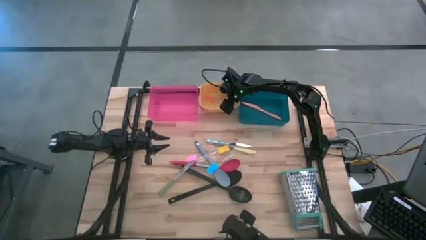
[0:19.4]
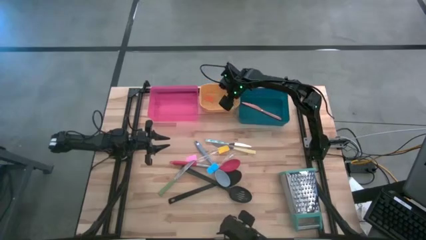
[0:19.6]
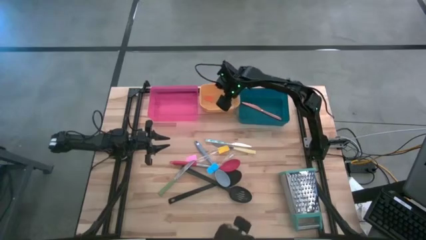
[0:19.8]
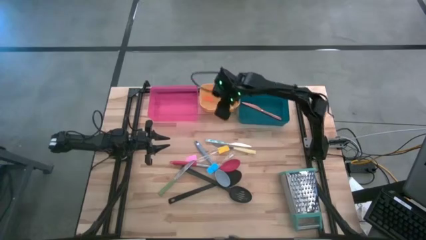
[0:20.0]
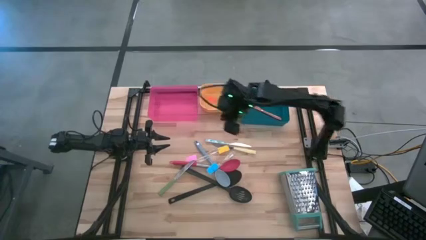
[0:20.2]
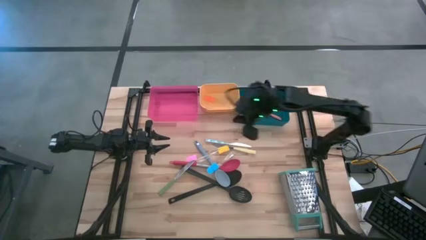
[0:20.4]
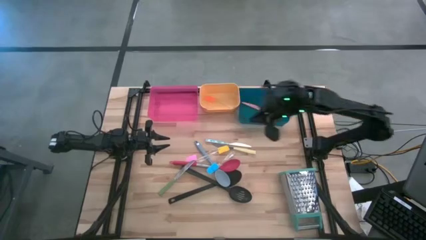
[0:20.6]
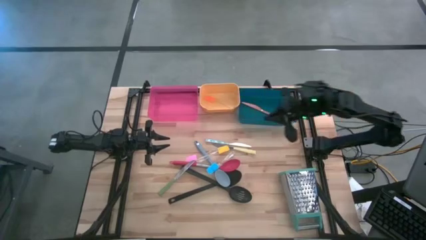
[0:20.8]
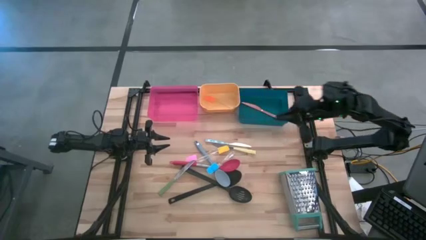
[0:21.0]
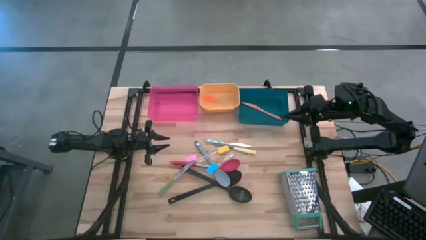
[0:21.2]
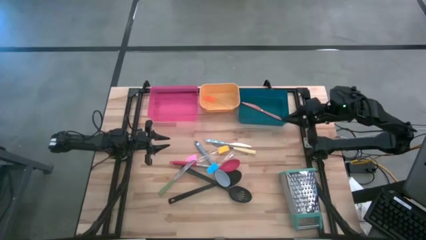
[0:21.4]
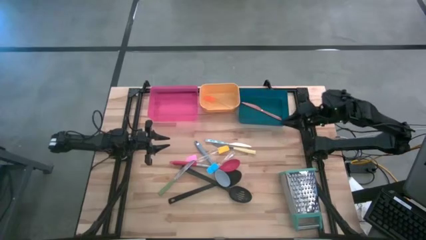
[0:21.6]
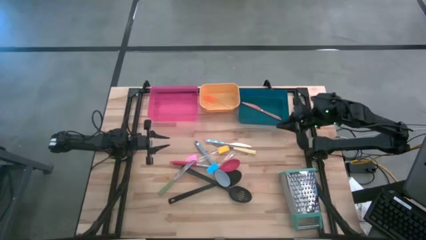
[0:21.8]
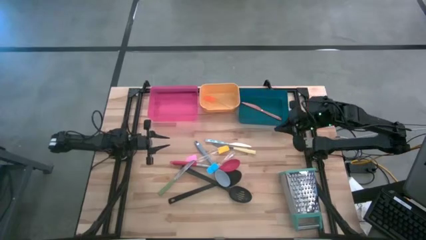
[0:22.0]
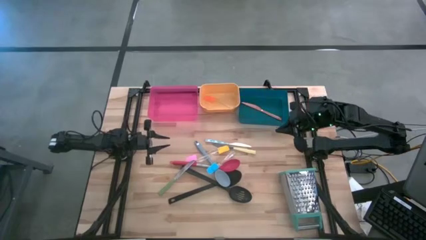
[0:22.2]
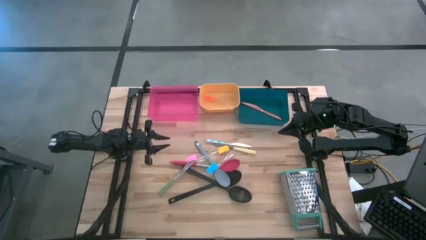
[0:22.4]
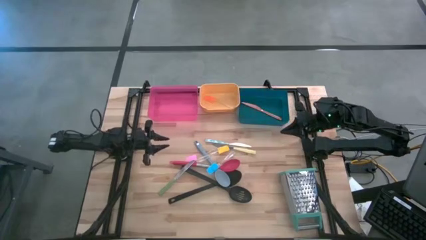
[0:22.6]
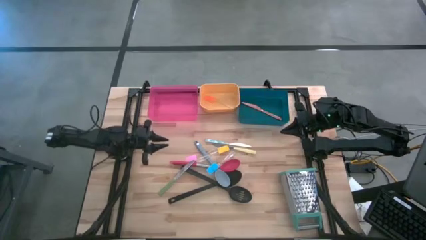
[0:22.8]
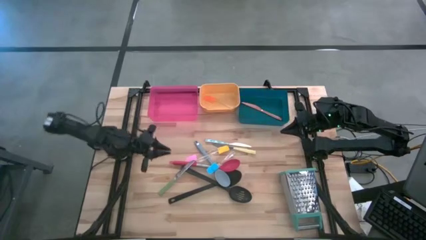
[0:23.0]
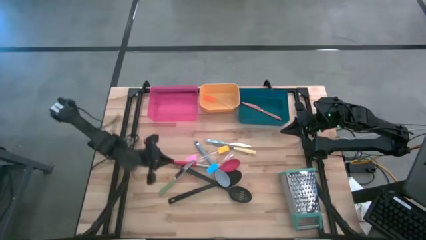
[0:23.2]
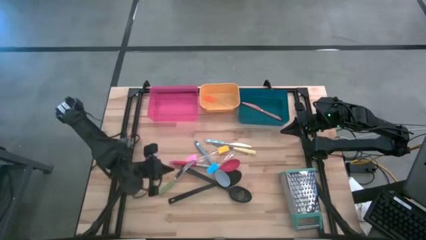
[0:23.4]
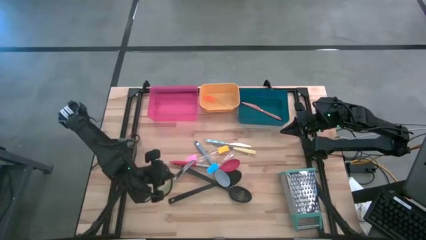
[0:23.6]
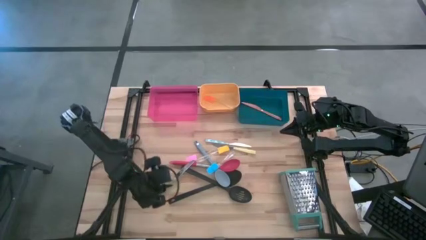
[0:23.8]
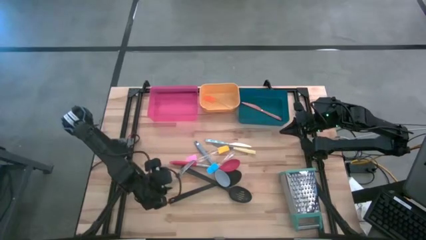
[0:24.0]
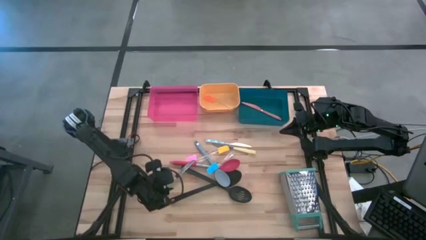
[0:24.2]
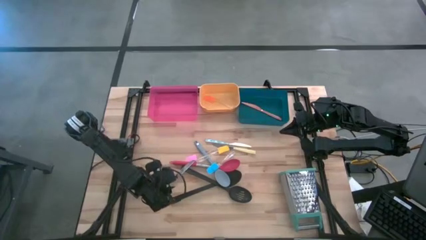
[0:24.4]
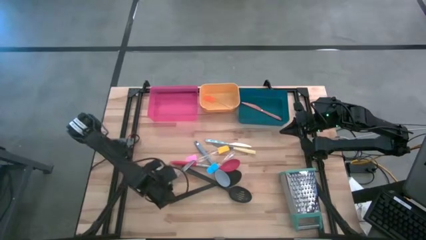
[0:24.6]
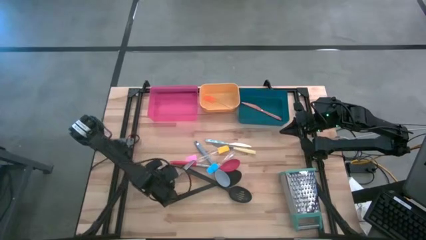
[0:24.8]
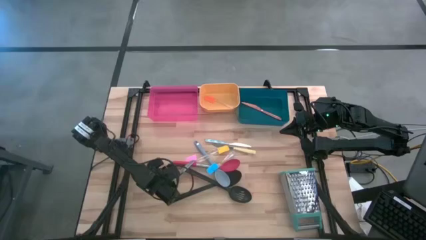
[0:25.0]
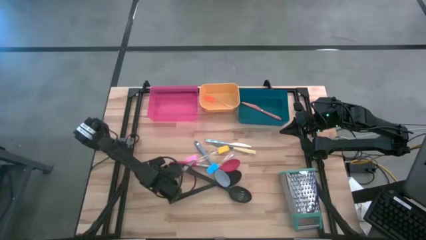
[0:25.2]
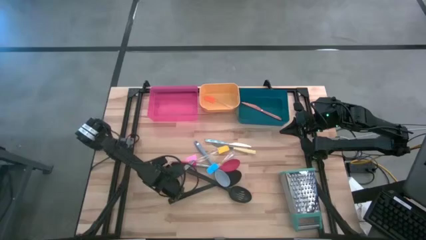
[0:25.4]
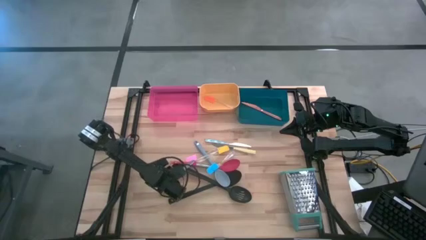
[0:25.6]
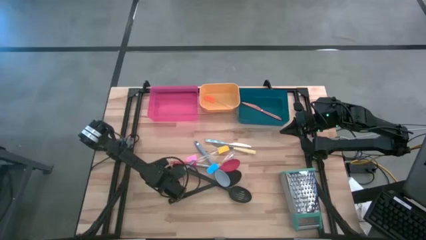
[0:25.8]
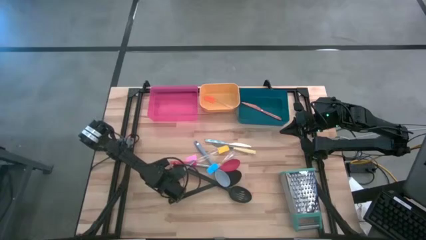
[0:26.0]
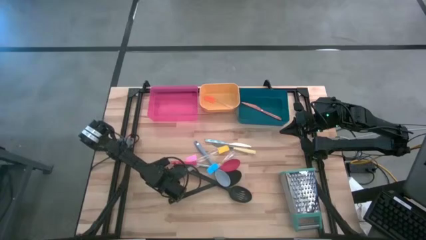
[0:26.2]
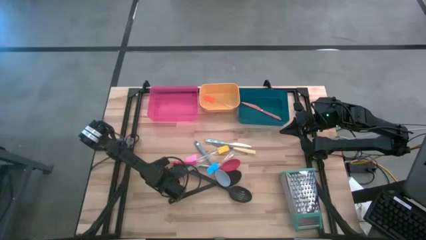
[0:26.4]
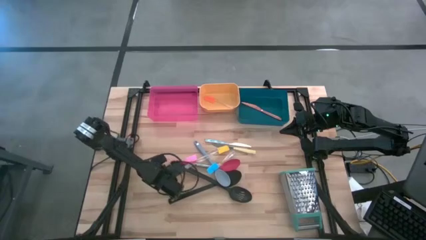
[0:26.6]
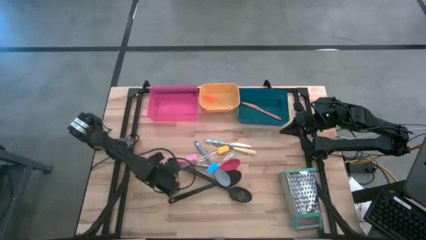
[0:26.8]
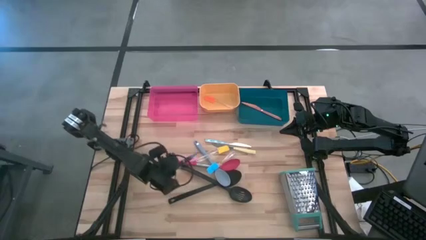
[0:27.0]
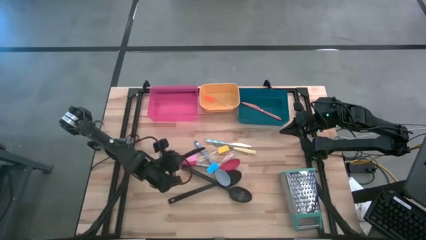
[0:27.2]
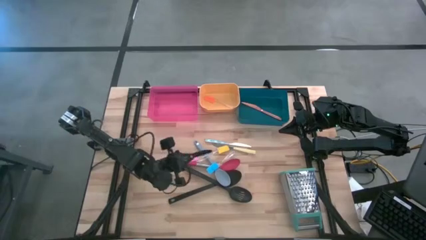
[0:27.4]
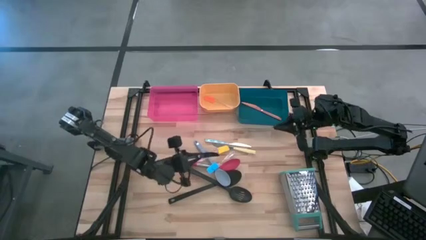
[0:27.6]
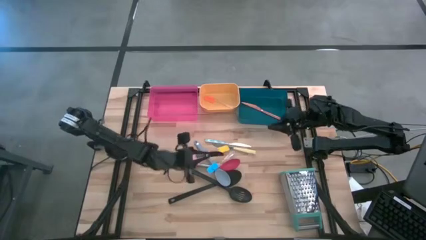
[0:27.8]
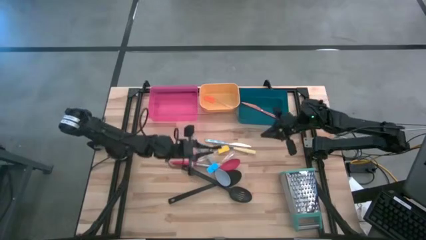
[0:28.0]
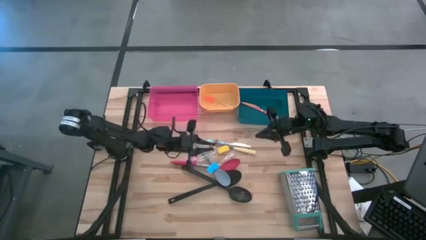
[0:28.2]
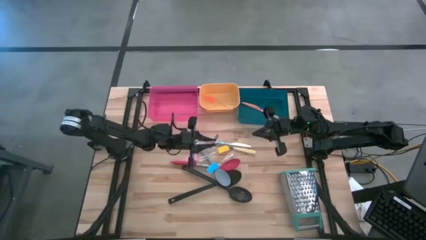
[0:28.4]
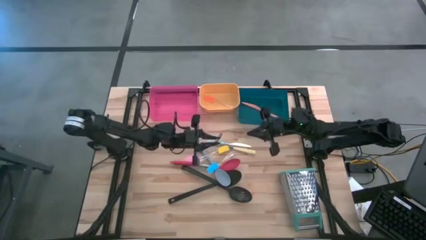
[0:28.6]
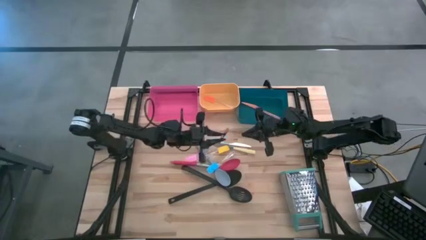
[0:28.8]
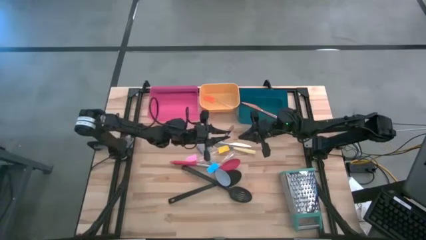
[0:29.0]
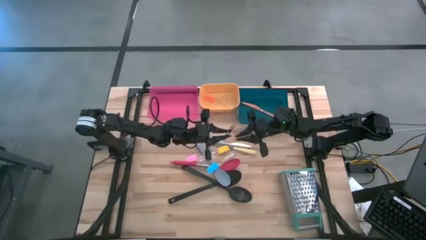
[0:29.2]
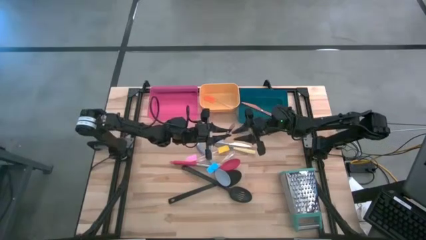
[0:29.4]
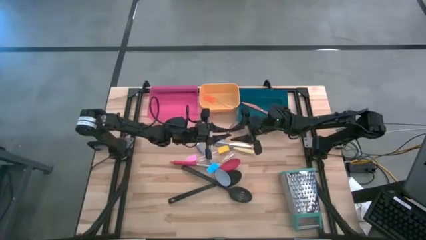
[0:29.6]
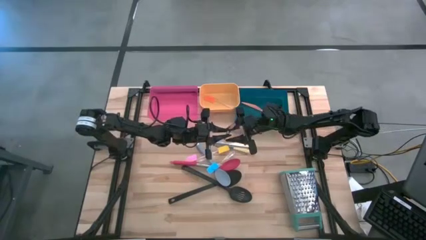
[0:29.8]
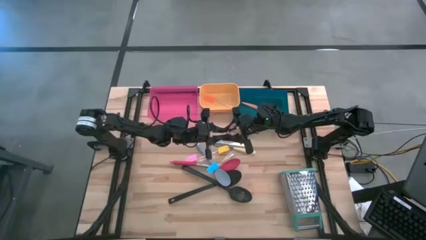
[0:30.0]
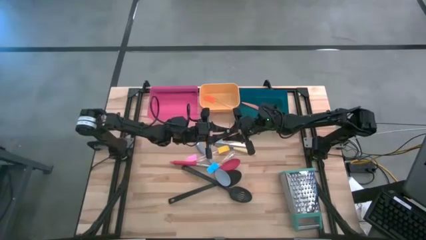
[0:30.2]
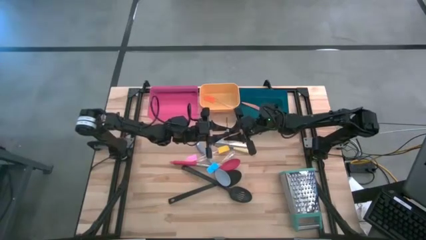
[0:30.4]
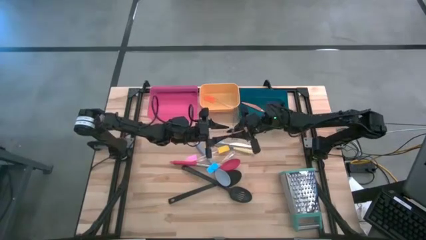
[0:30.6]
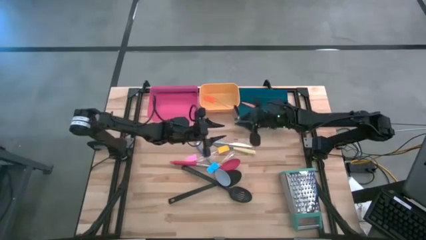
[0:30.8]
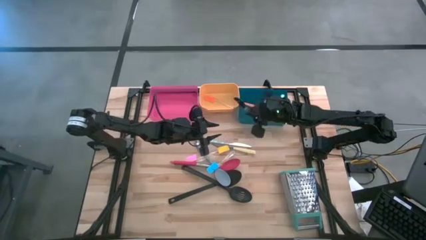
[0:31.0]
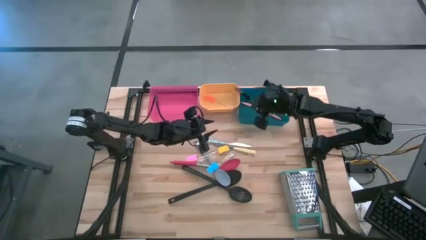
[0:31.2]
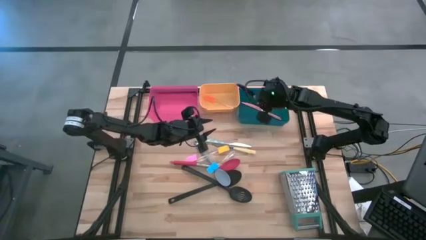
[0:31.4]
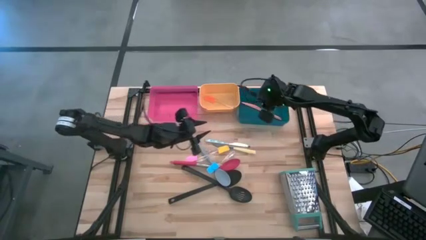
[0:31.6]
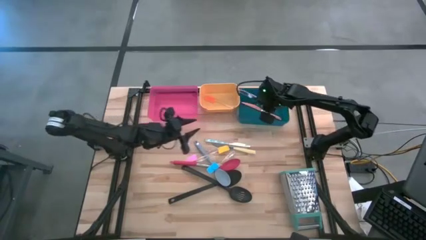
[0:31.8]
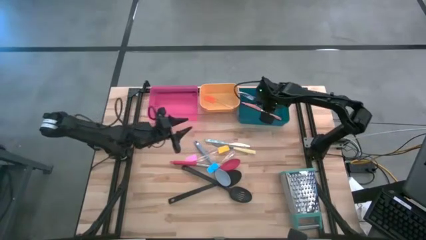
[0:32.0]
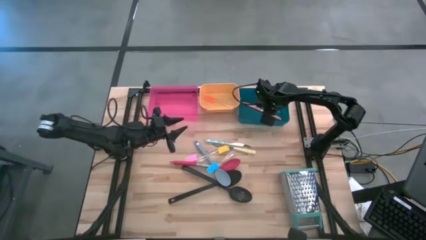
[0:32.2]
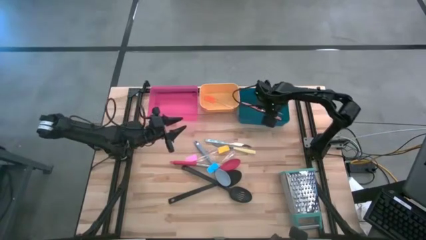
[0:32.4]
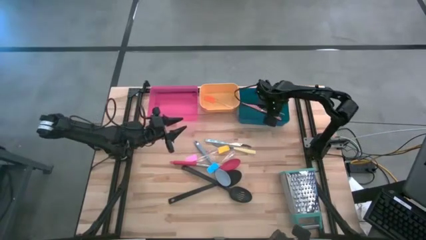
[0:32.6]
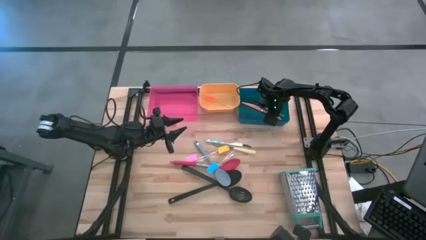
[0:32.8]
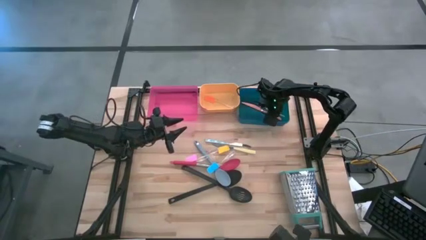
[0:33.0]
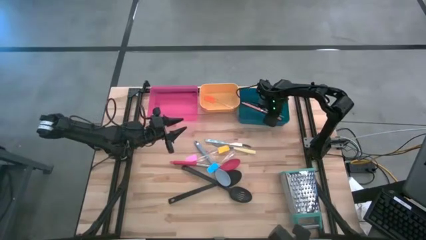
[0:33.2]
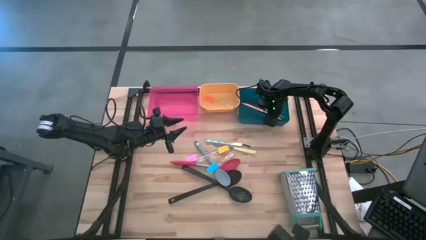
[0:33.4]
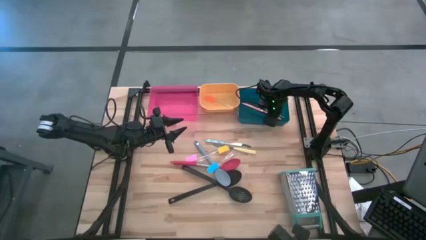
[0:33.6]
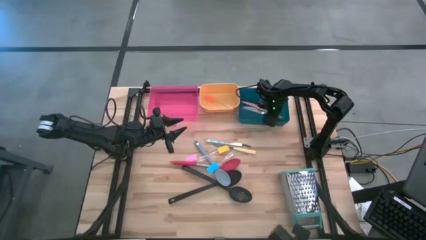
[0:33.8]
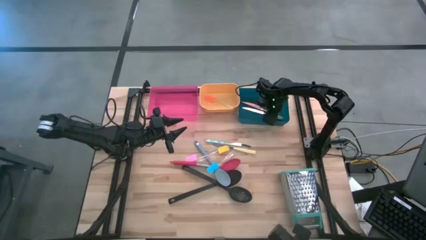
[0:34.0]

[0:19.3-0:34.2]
Task: Pick & Place Kitchen Items
Put the green knife into the blue bin

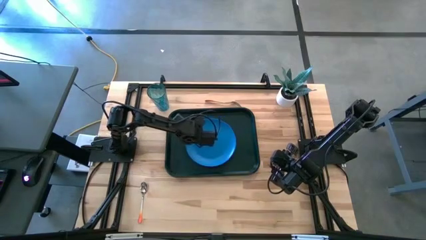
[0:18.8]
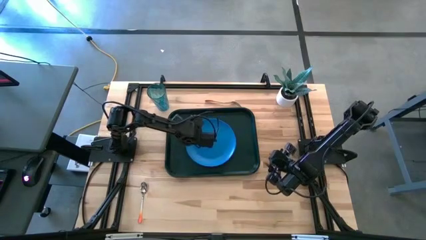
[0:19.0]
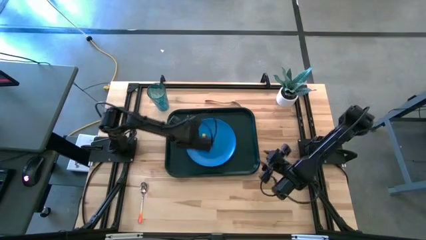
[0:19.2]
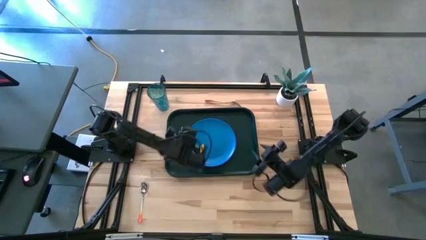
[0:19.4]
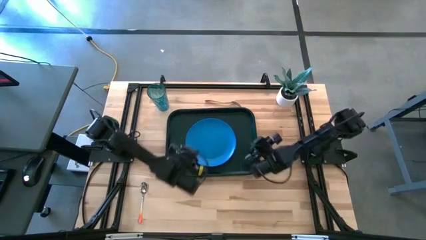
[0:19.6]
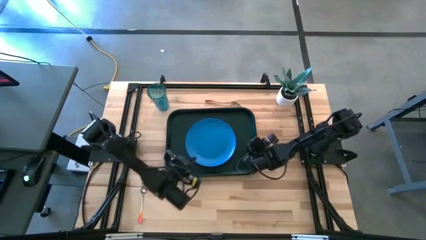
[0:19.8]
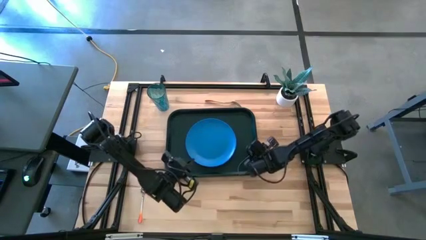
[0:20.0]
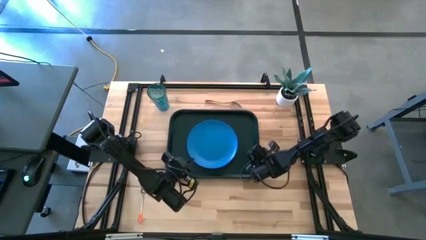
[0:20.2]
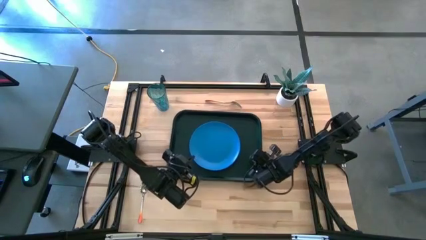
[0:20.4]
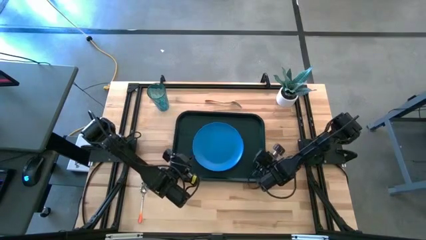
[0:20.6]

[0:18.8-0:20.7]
Task: Pick and place plate/cup/fork/spoon on tray
Adjust the serving tray
